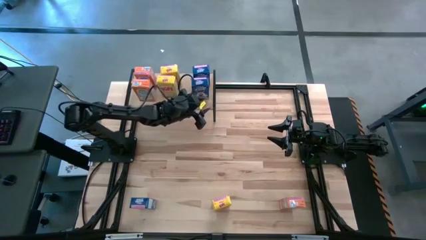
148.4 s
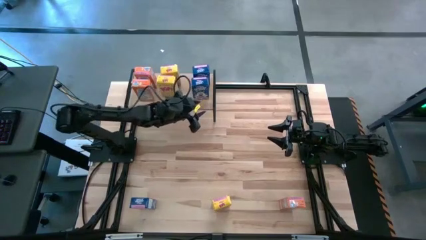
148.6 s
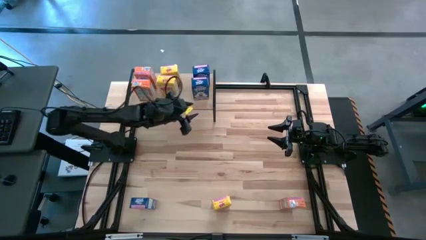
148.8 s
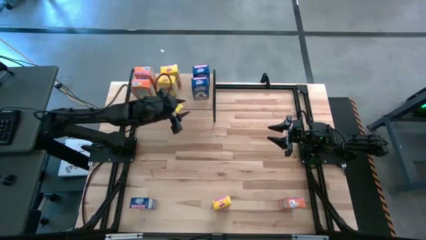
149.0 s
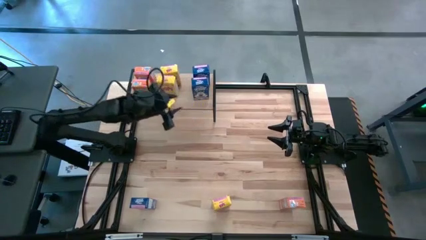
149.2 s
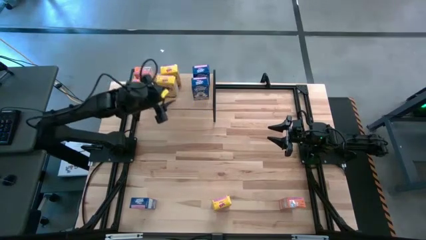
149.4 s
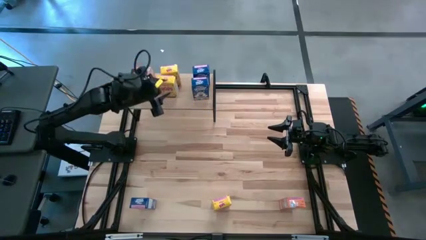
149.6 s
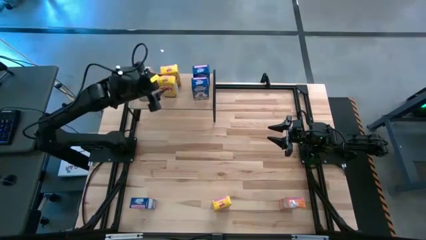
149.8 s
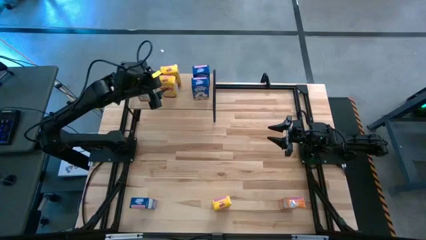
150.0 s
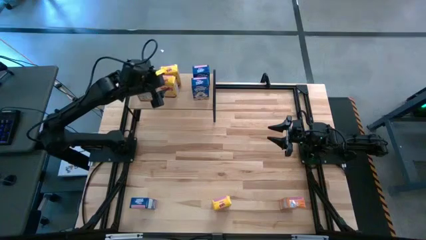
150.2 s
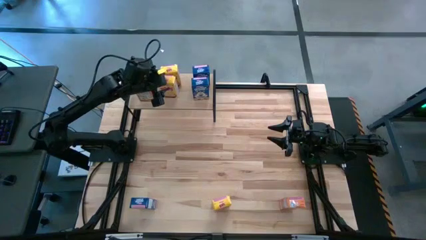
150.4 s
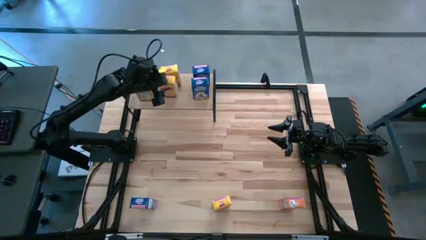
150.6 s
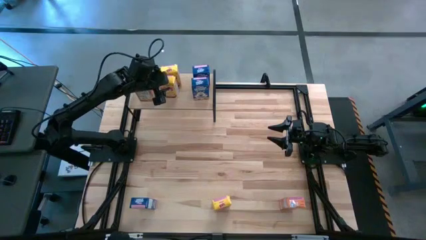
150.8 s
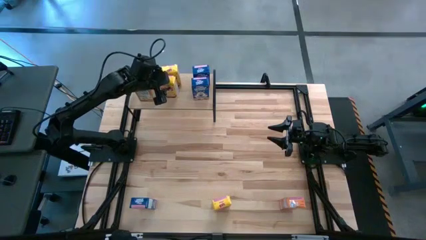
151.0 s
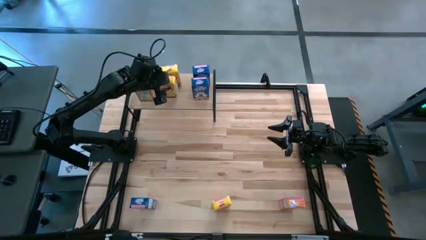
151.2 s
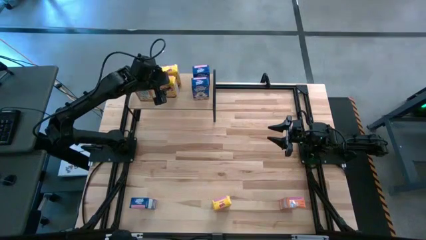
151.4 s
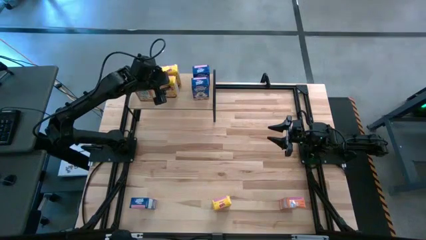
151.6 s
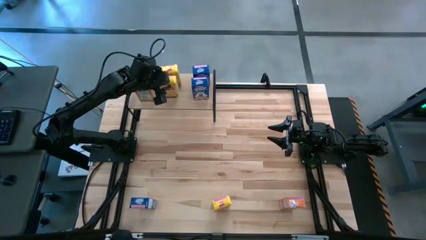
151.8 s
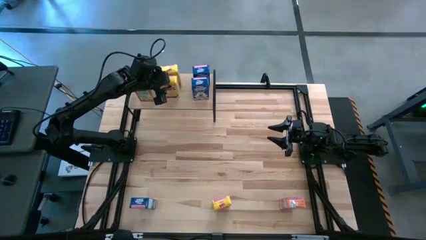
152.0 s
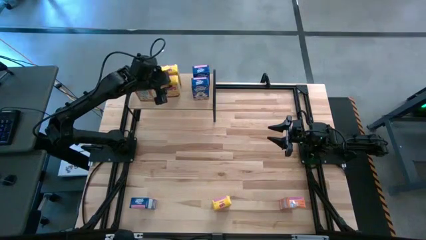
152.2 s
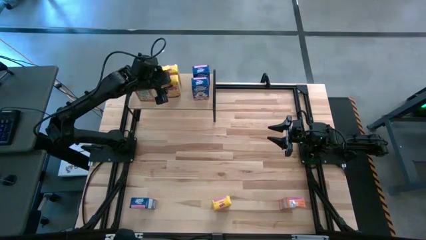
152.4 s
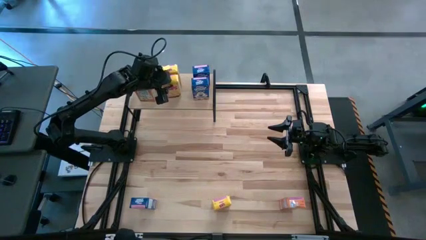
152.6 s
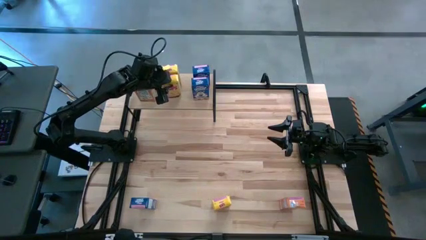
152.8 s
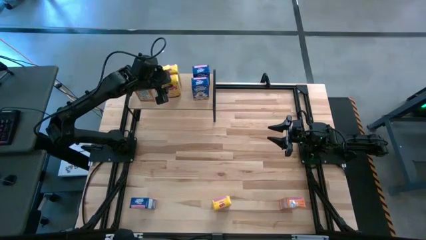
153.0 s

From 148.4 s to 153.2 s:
Task: Stack cereal on shelf
Adjust the yellow cereal box on the shelf

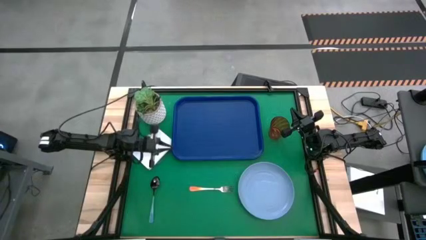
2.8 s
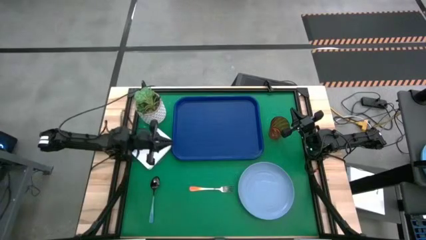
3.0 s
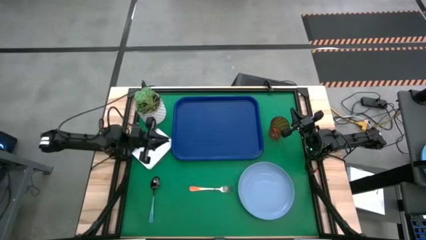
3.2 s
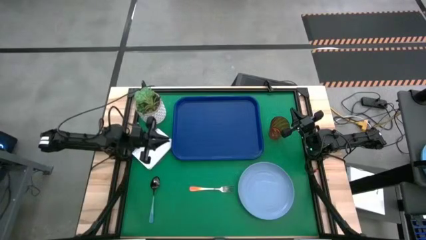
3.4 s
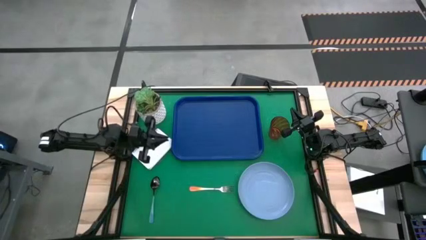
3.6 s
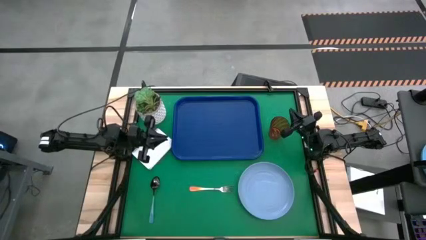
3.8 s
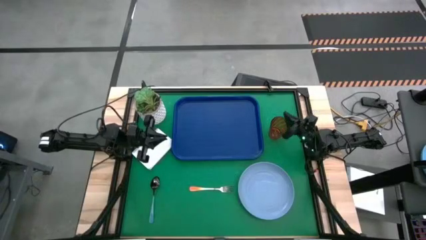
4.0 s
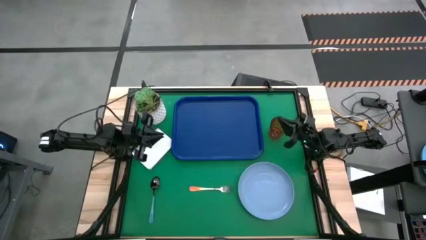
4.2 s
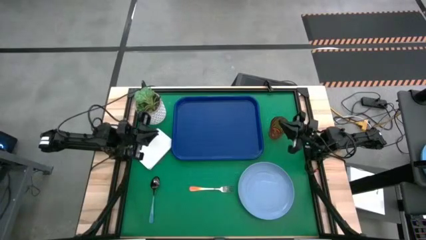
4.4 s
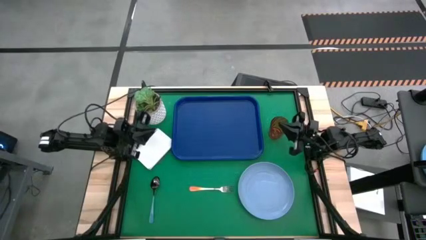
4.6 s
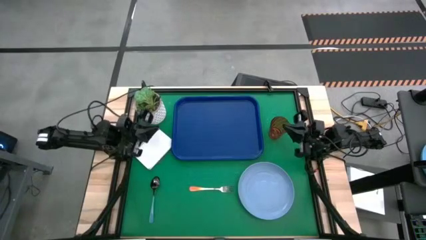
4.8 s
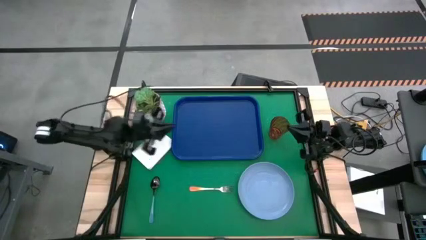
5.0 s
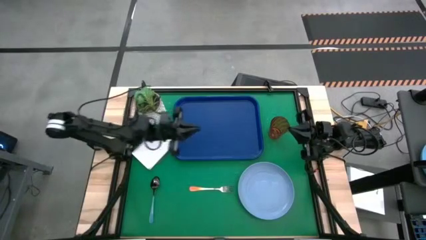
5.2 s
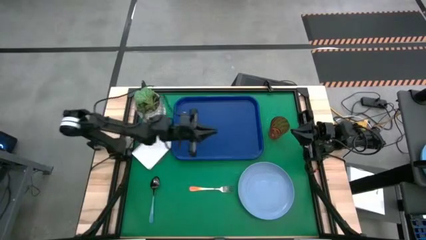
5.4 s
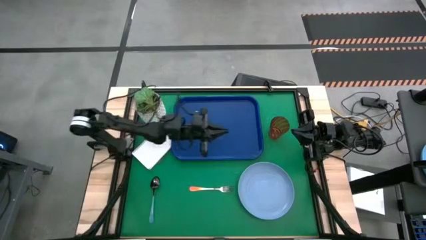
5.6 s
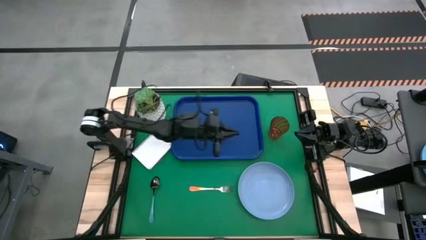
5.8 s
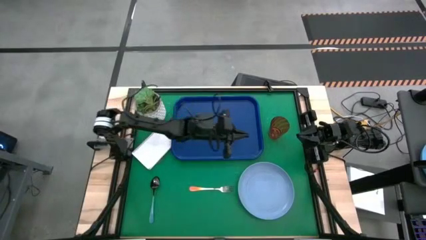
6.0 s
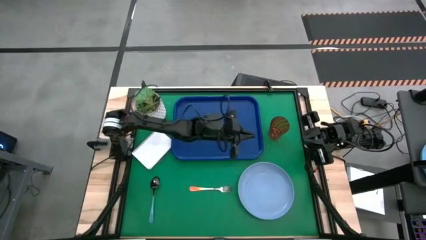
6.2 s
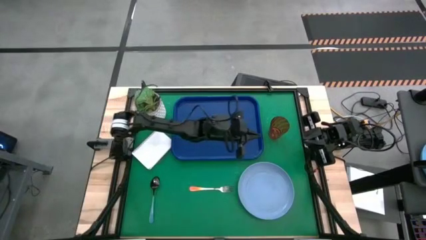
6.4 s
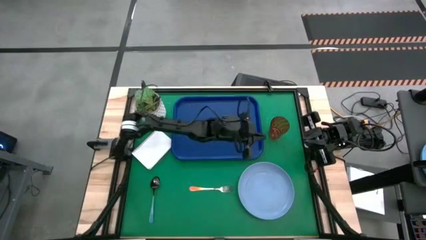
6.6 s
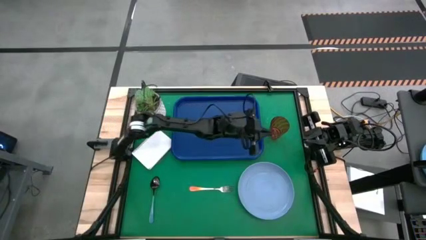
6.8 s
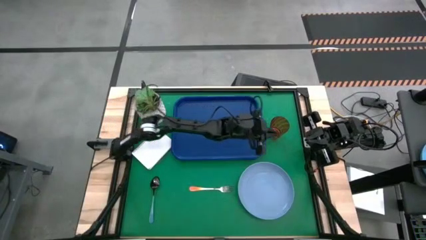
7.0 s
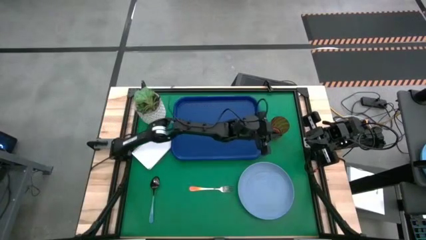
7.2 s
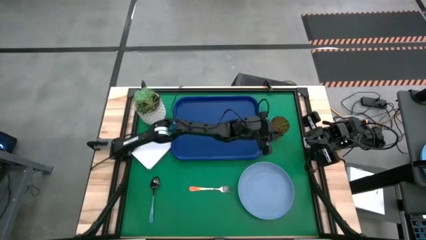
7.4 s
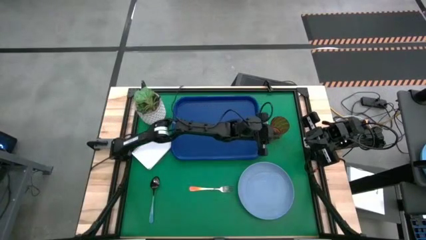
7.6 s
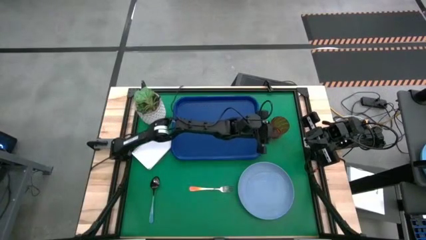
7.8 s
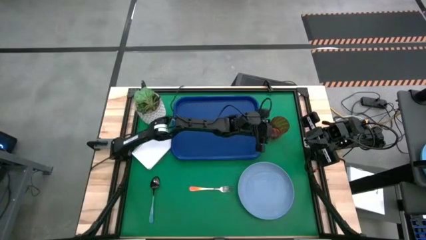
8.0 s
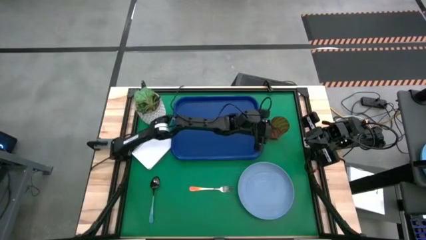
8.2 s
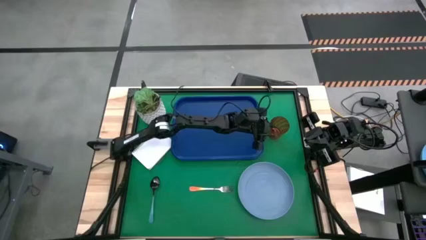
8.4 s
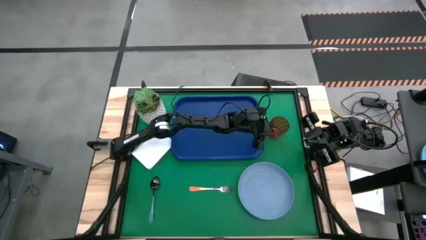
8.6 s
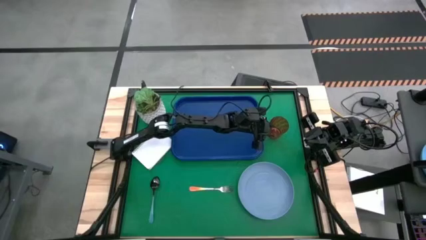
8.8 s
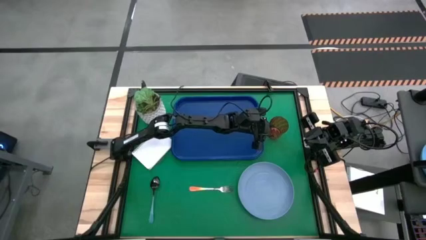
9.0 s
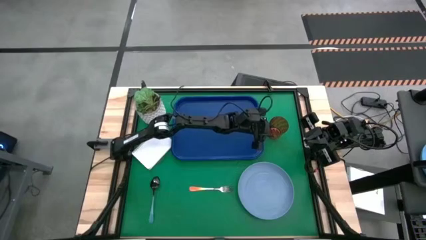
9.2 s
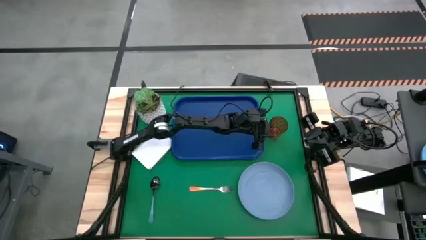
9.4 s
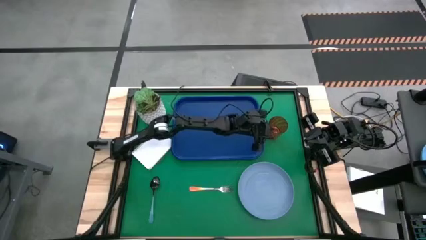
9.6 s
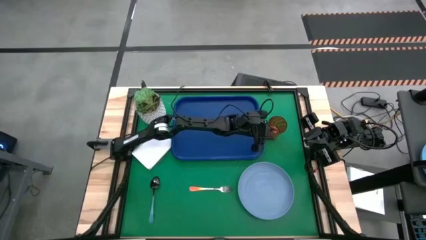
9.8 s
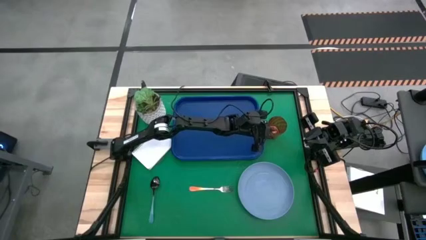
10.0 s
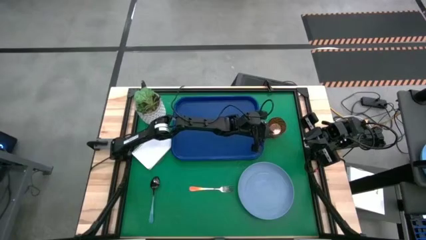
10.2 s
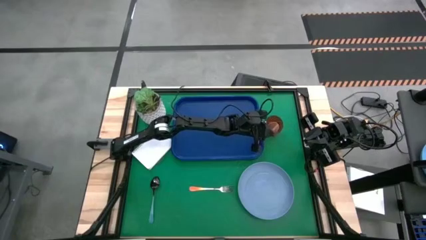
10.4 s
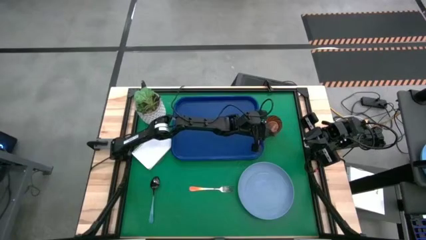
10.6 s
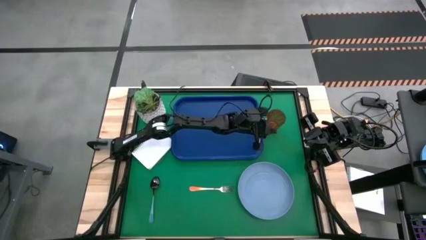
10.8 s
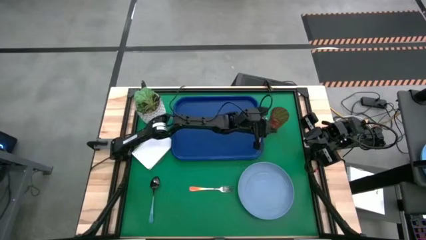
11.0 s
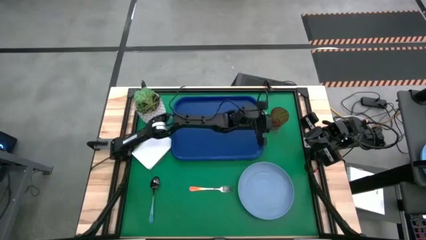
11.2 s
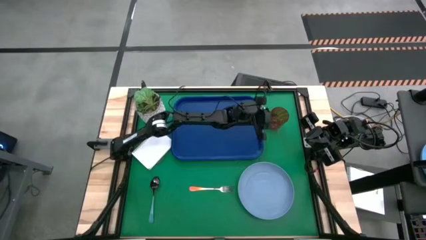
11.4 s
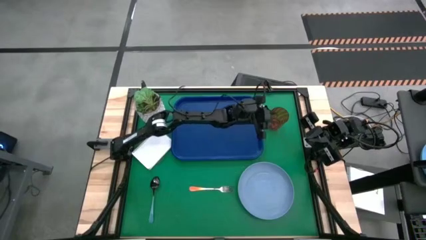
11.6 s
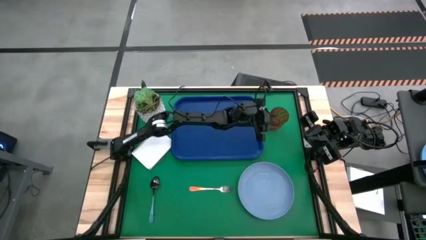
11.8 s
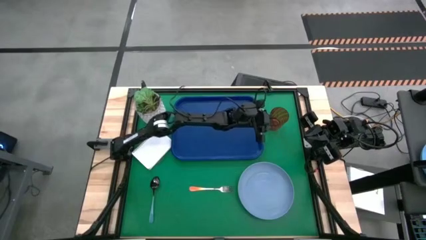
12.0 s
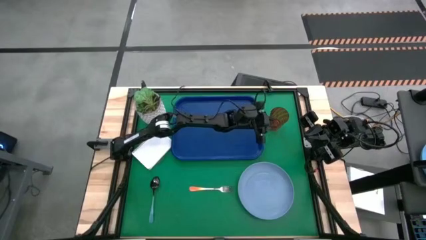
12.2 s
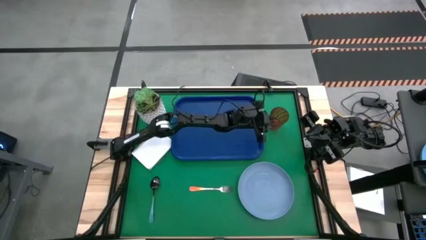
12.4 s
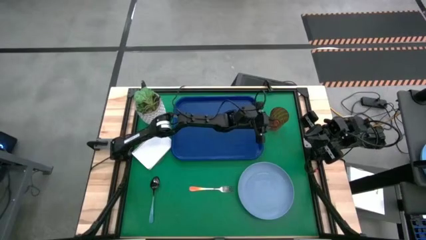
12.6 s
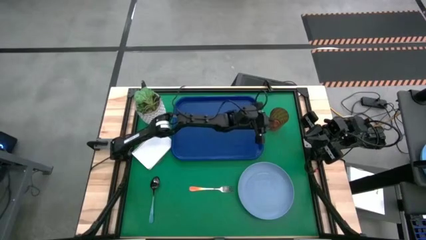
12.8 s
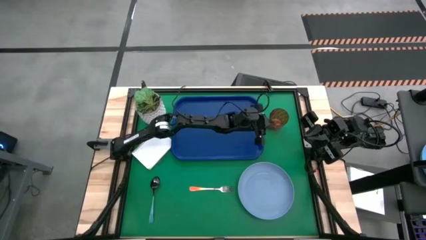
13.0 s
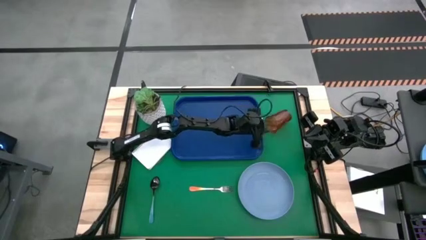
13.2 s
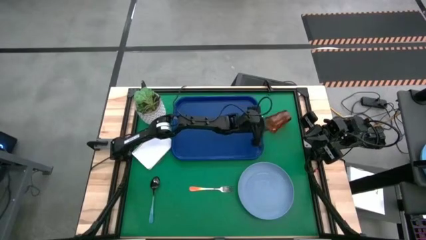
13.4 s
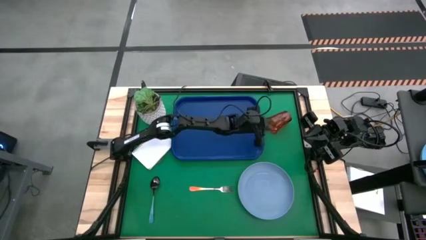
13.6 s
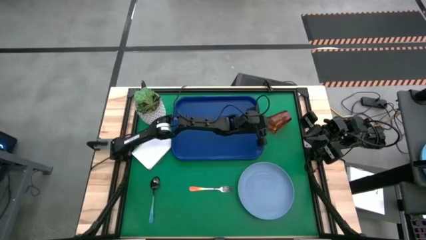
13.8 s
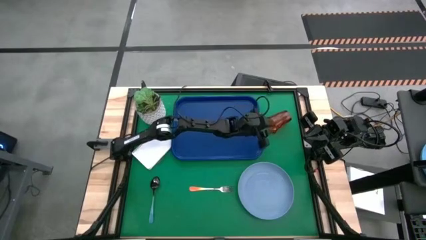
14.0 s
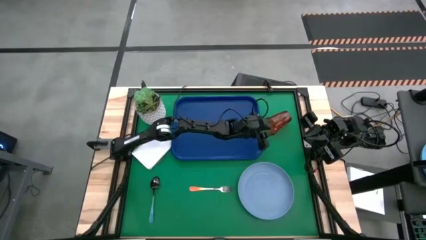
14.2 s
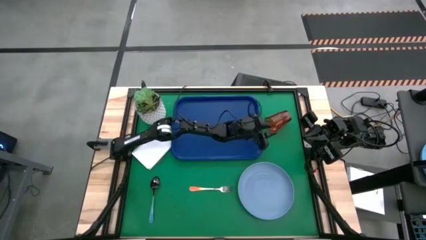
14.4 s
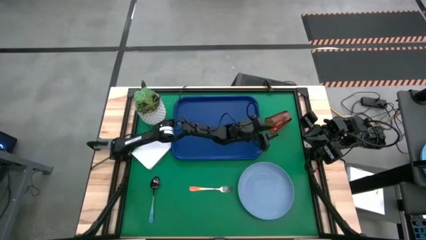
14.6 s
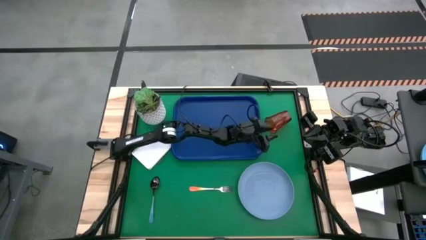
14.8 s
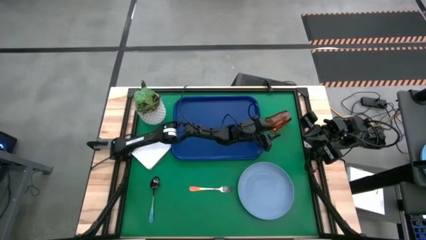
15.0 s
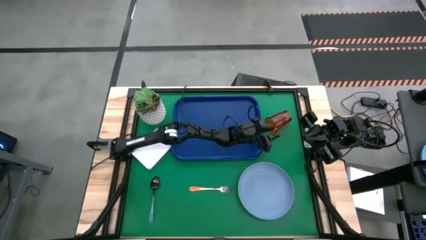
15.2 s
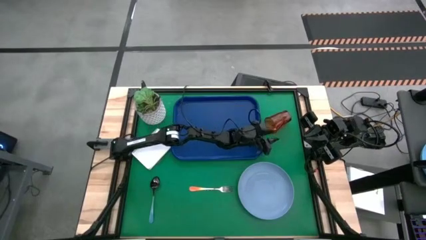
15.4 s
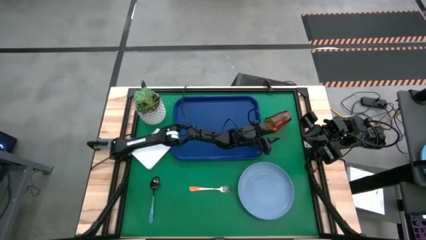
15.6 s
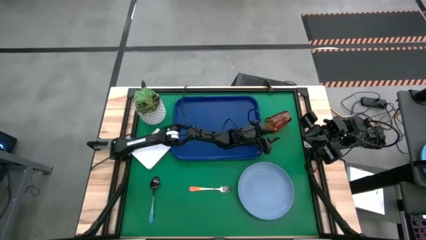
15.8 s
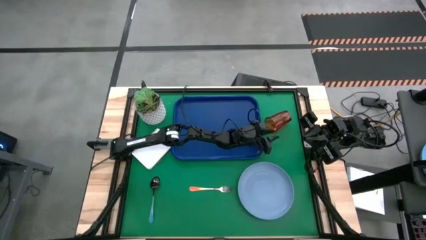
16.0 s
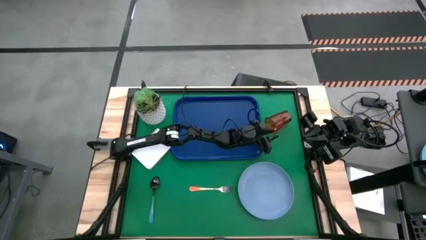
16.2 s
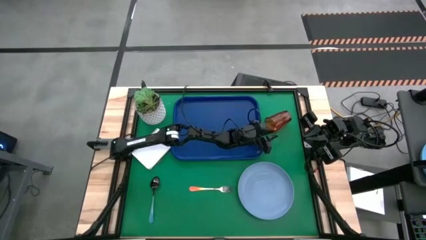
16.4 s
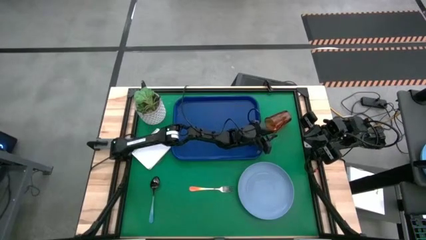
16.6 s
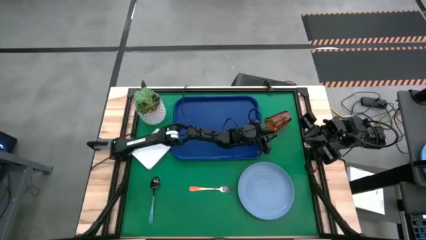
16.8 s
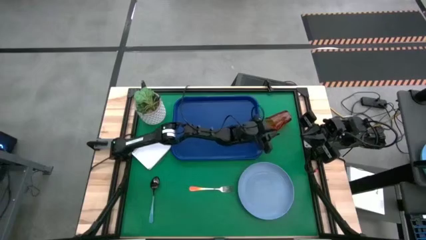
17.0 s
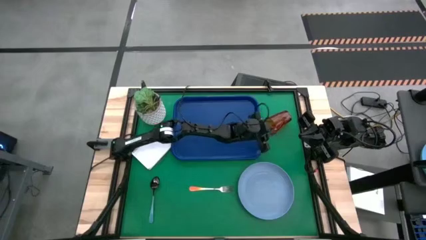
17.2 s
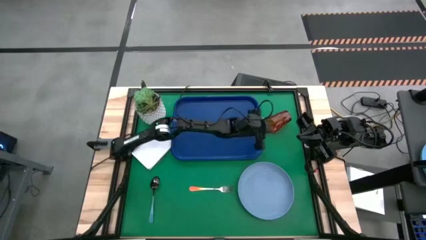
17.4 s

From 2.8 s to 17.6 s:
Task: Pick and place plate/cup/fork/spoon on tray
Put the red cup on the blue tray
